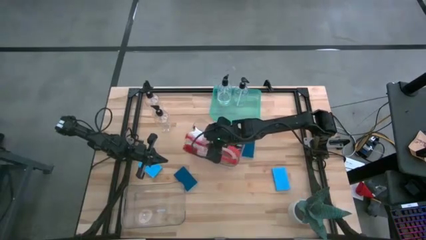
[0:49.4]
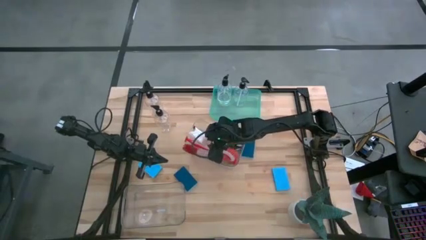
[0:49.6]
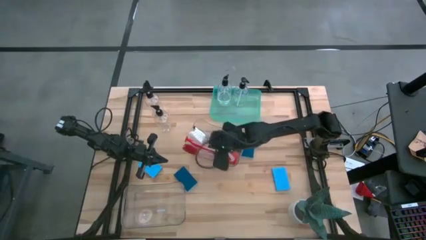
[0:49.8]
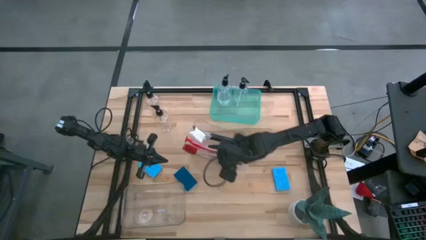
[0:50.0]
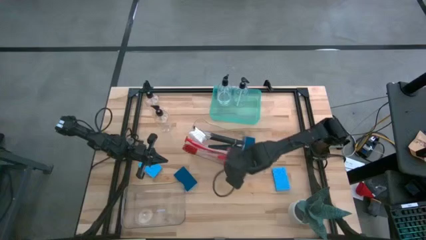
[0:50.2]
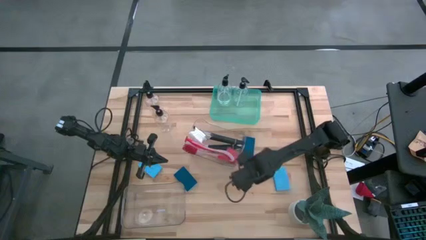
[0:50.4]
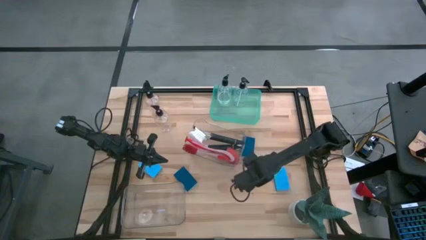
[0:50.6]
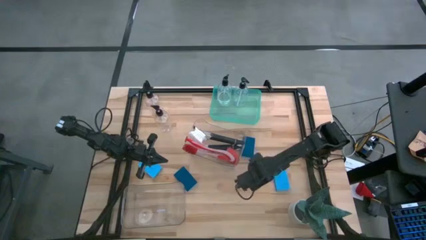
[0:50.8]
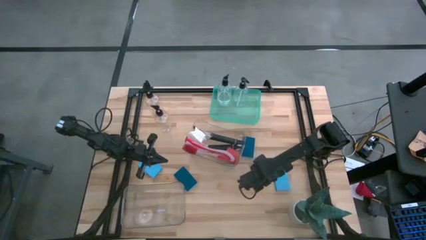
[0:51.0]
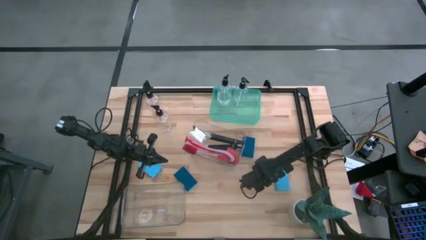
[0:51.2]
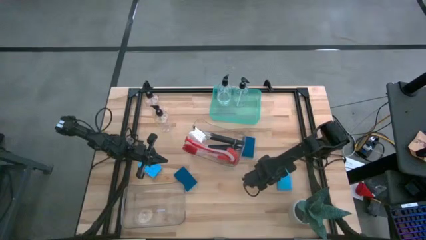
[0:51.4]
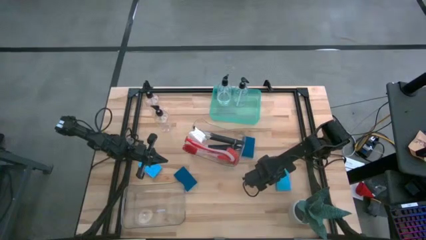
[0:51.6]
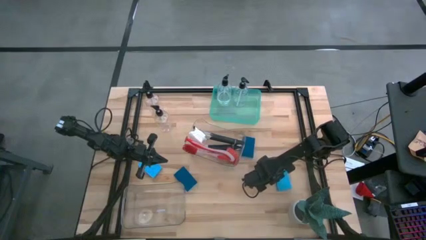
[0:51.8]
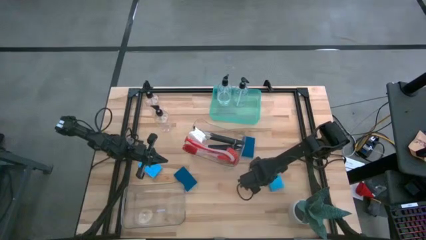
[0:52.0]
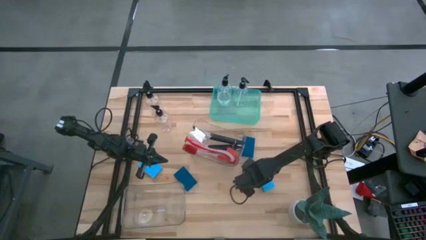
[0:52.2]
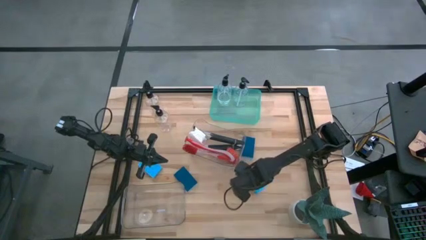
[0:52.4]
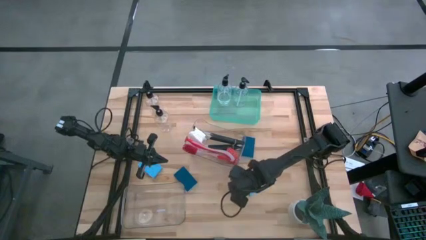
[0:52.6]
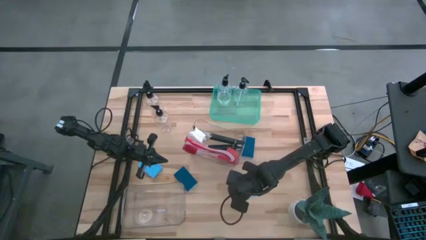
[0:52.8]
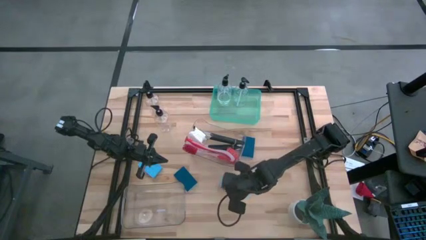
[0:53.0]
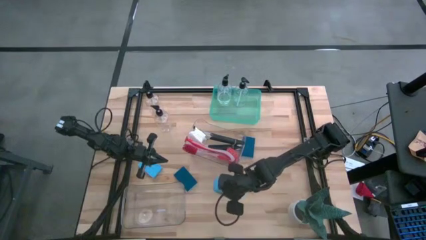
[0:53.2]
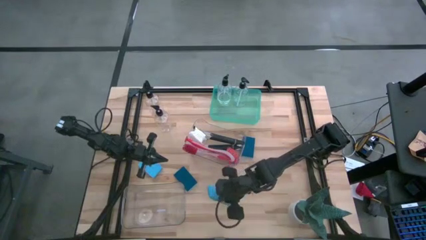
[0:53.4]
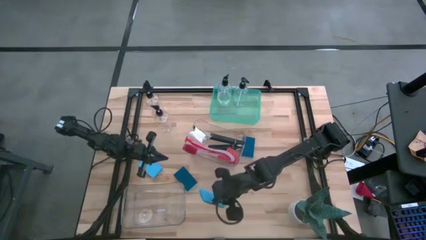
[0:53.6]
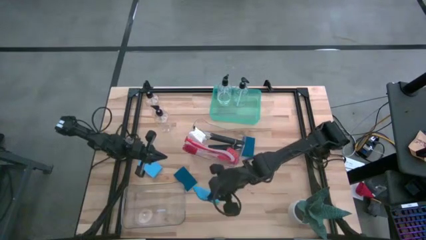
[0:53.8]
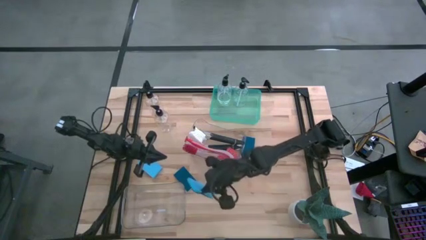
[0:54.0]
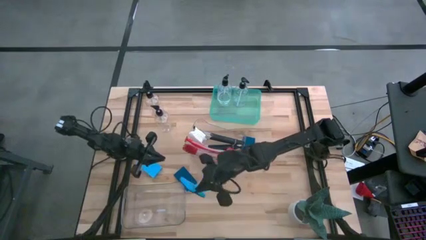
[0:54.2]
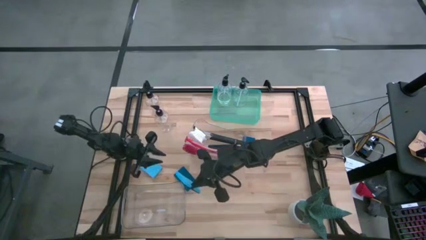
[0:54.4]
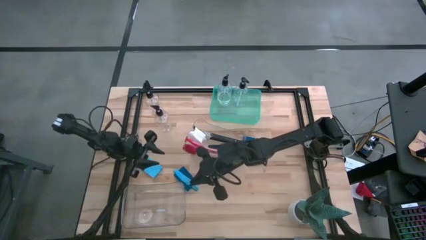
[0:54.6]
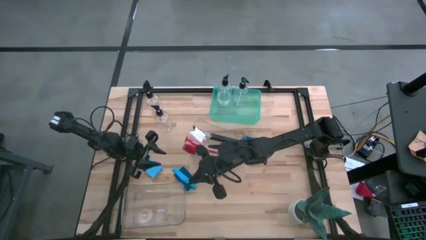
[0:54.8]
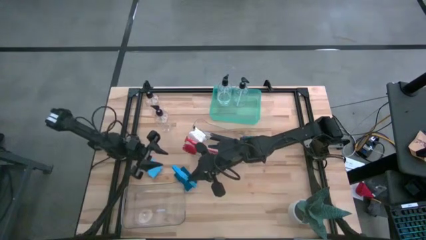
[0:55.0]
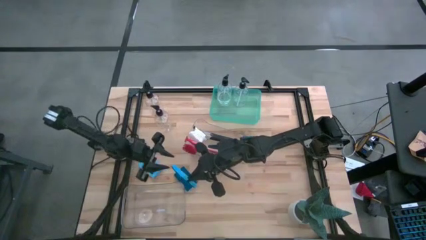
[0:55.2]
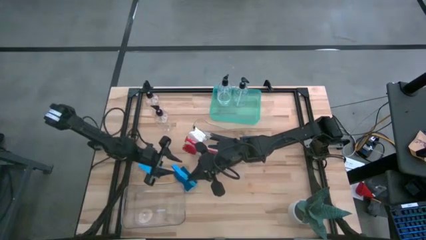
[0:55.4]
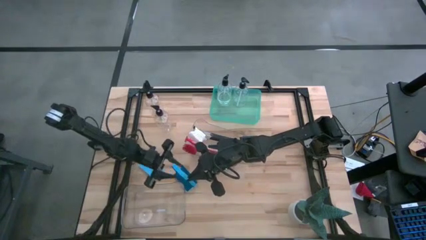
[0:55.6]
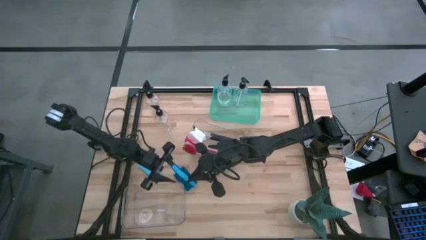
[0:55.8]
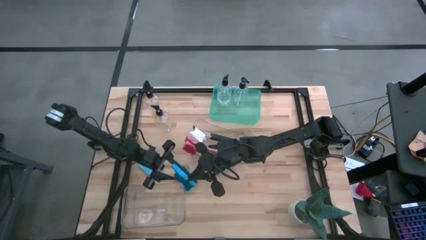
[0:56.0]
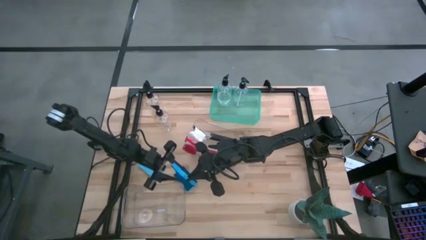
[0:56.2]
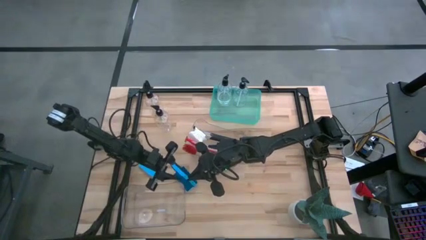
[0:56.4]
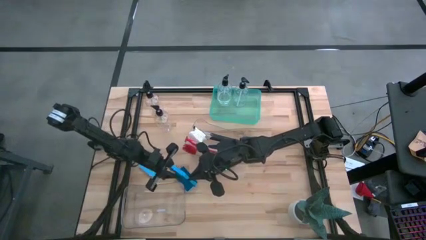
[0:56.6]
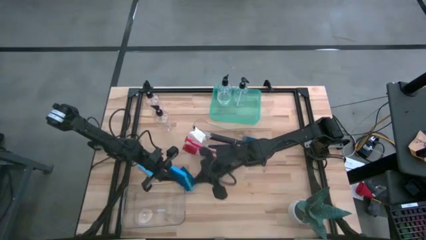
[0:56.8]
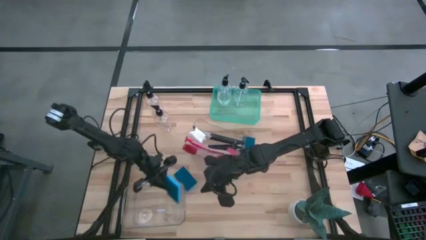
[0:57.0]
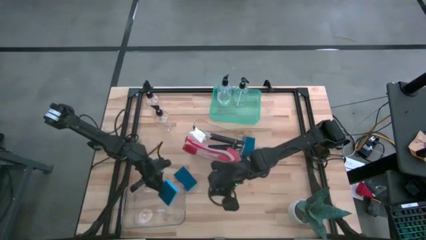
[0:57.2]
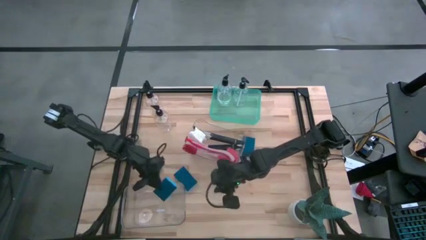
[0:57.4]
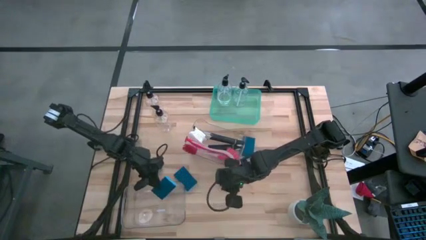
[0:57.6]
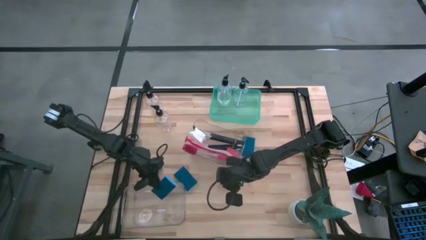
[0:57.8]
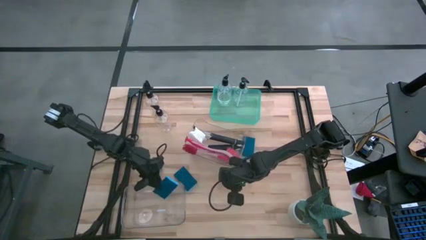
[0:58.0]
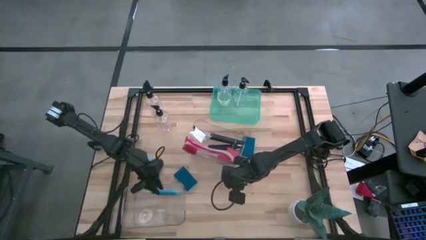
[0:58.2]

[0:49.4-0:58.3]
Task: Pick & Place Kitchen Sink Supplies
Put the blue sponge into the bottom transparent bin

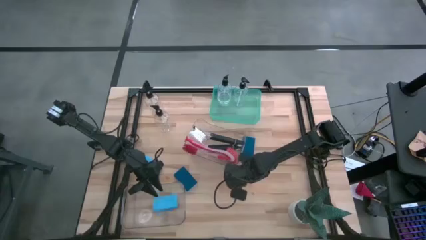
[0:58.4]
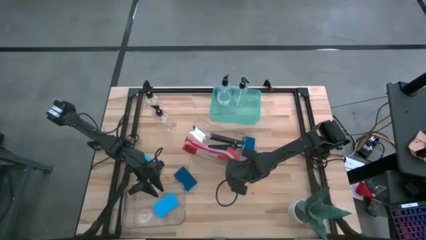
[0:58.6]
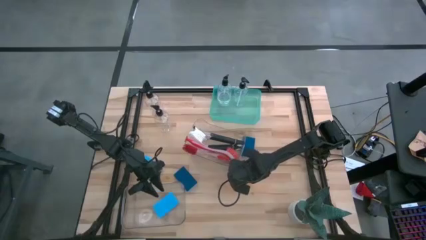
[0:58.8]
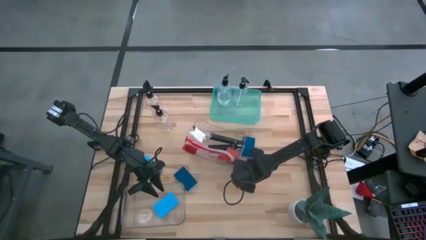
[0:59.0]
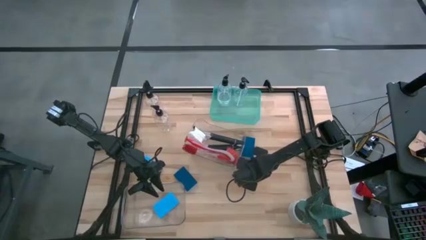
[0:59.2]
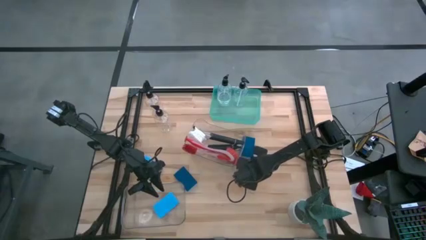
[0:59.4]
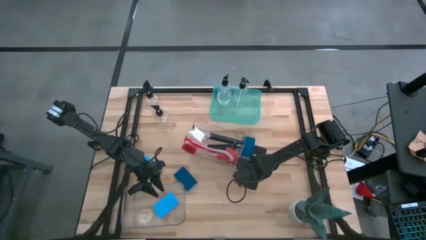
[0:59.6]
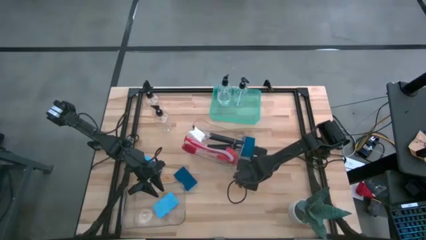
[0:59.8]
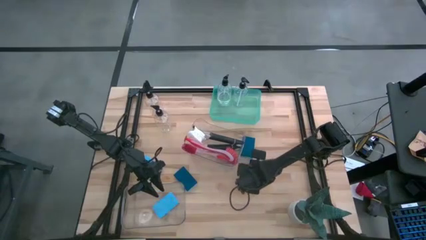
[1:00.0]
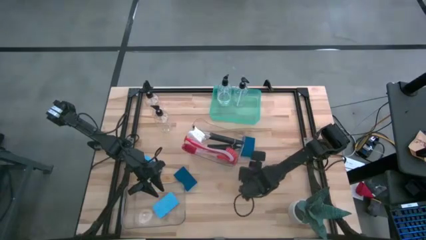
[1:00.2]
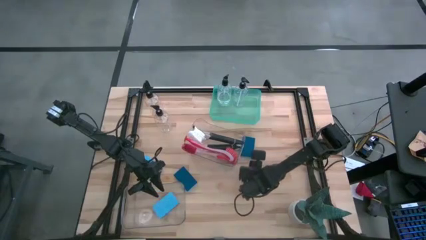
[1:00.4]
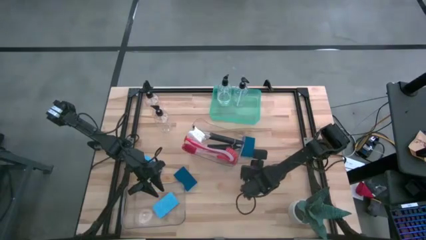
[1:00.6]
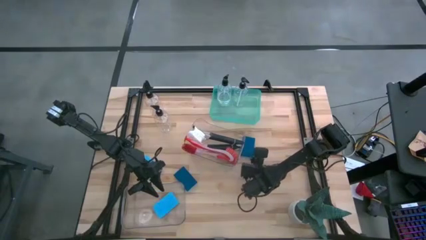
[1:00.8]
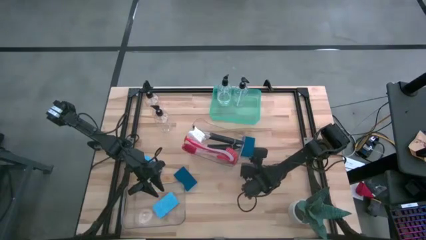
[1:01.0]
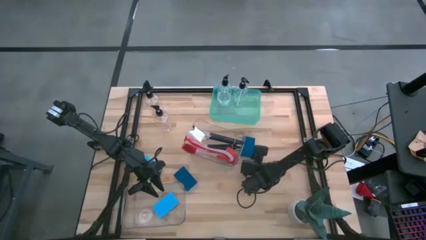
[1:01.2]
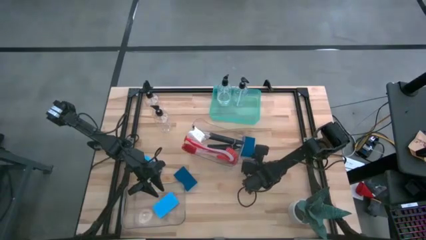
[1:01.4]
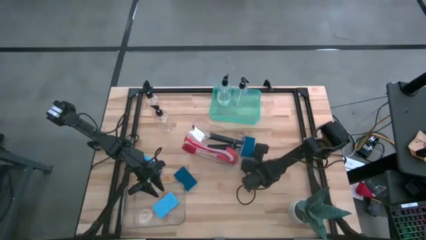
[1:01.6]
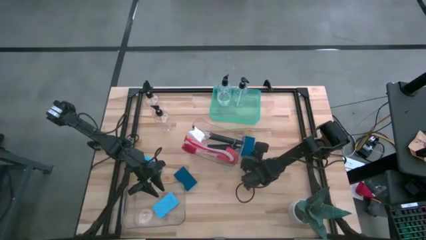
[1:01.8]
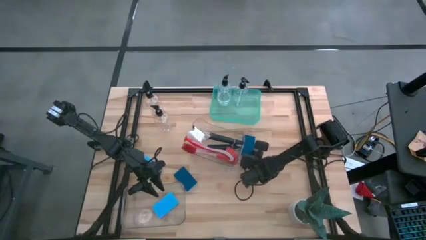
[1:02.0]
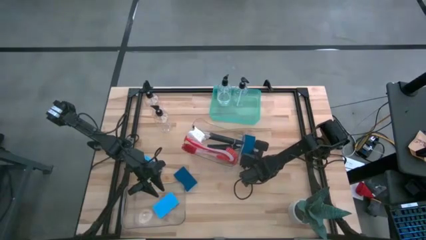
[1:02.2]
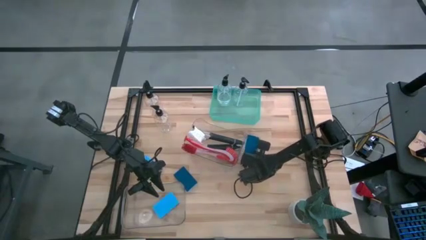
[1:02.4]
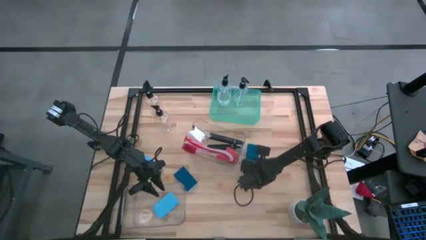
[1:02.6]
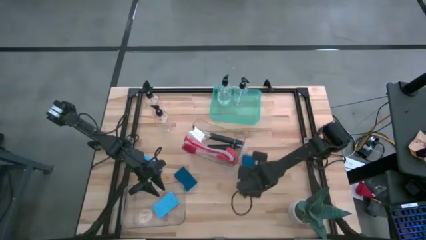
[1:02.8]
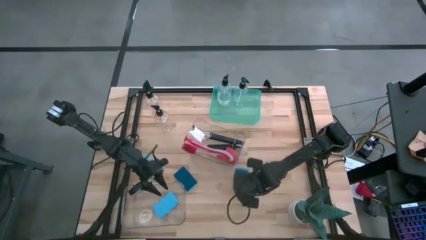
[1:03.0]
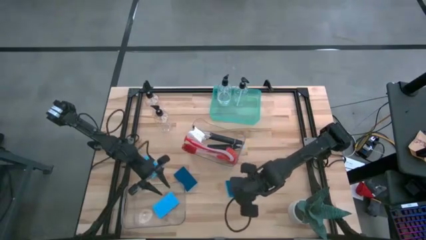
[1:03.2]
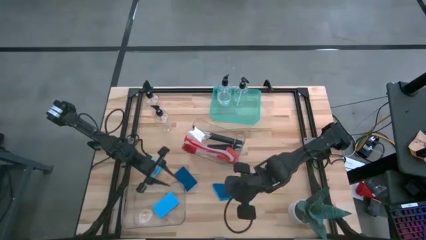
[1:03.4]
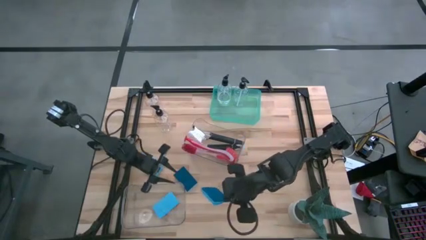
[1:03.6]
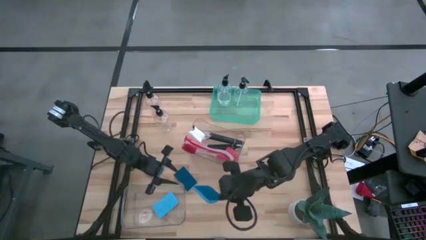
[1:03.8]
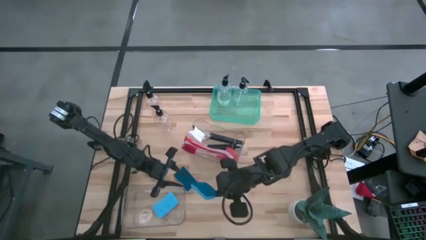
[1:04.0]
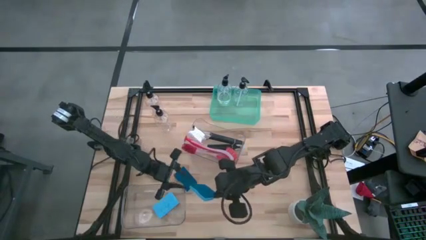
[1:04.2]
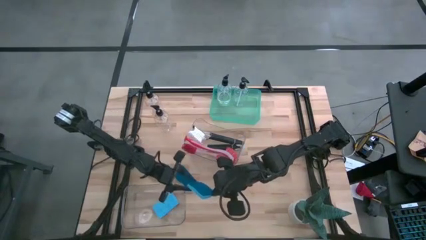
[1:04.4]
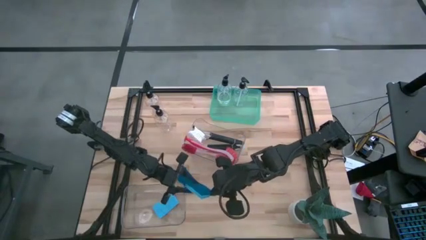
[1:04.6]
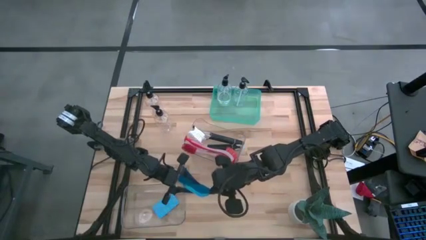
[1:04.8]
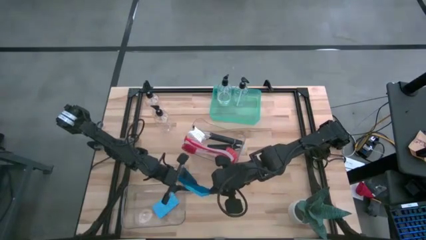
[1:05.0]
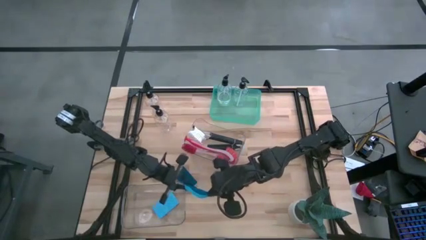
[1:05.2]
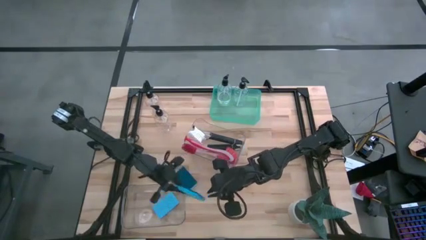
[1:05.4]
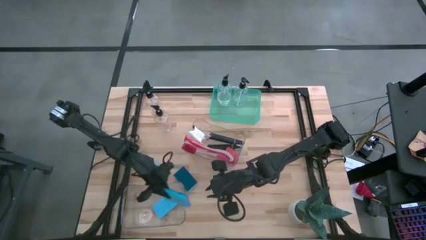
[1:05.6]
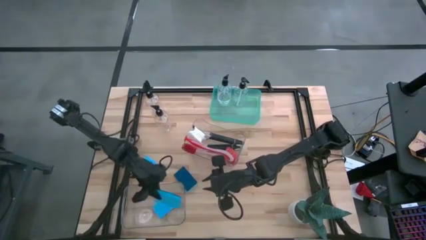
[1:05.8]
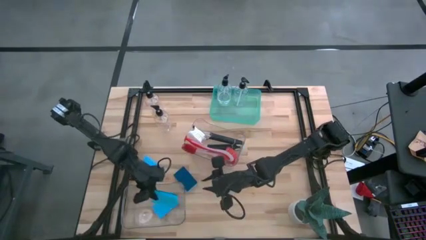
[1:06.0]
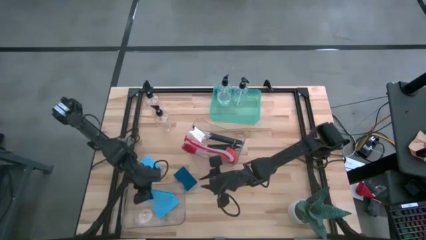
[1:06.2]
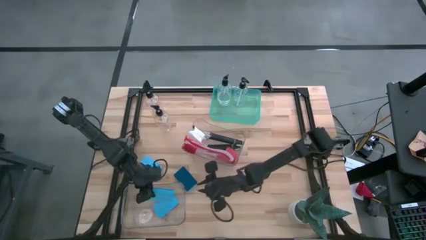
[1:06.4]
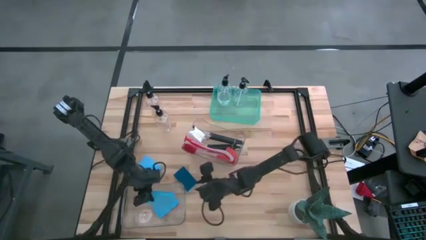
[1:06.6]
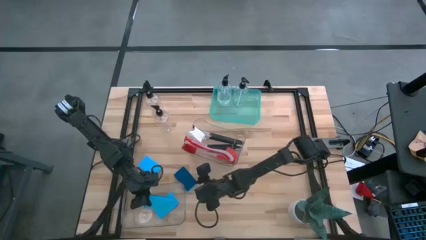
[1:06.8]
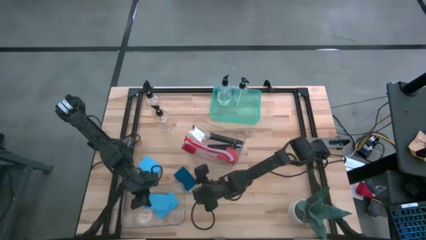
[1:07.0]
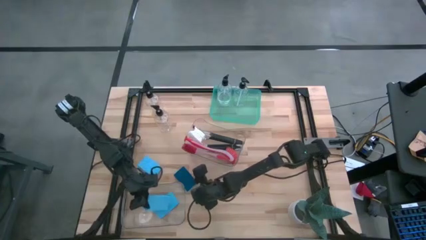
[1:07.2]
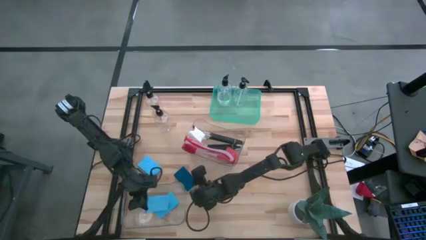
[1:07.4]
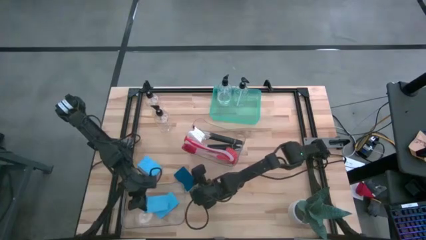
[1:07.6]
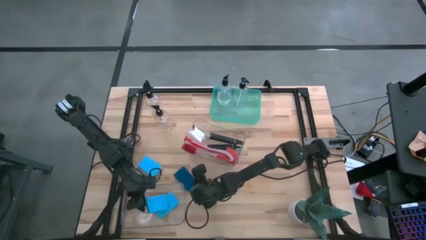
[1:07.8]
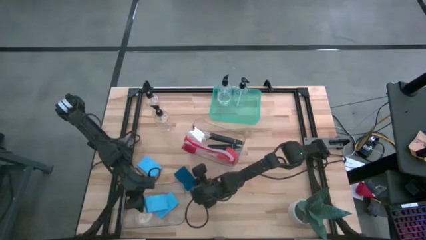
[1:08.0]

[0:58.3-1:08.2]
Put the blue sponge into the bottom transparent bin
